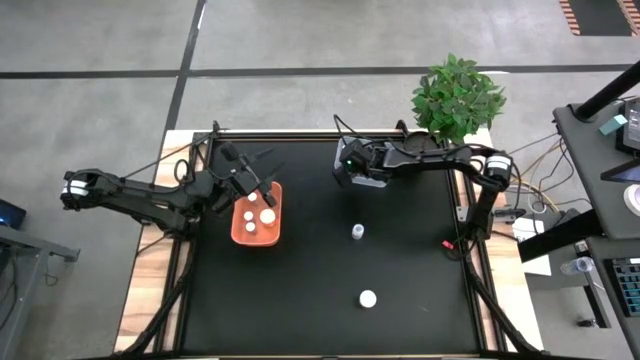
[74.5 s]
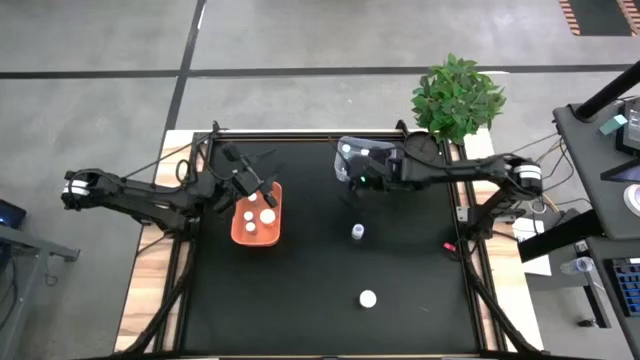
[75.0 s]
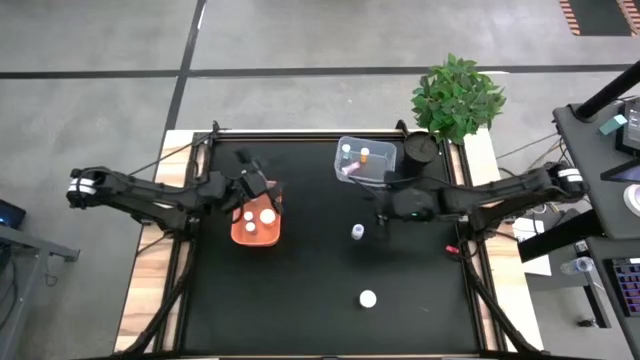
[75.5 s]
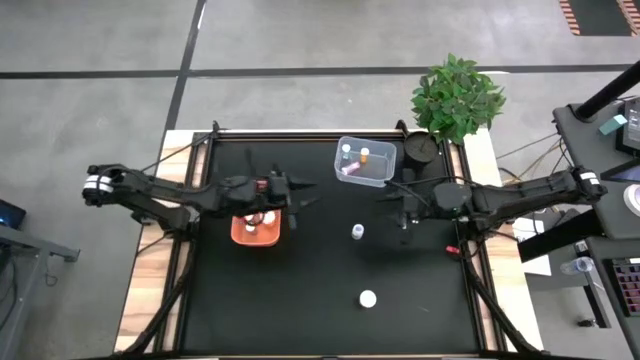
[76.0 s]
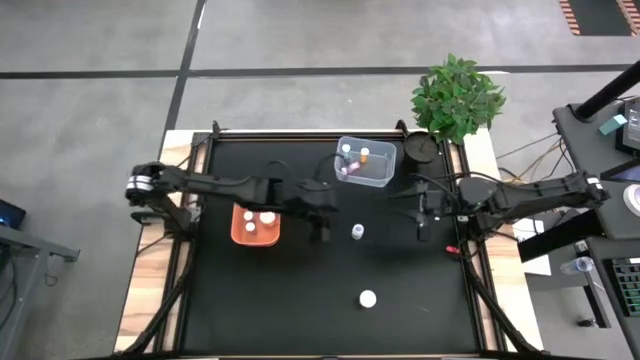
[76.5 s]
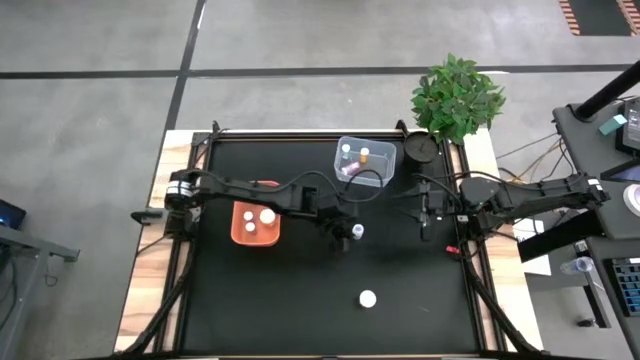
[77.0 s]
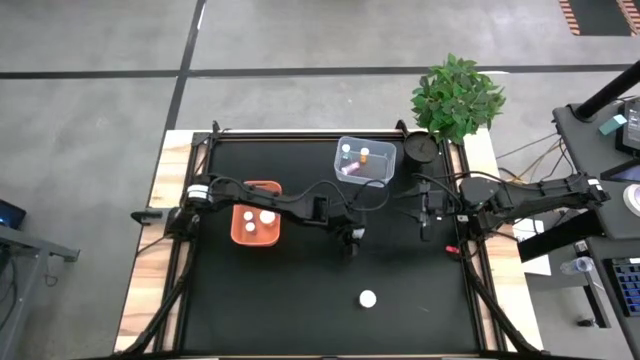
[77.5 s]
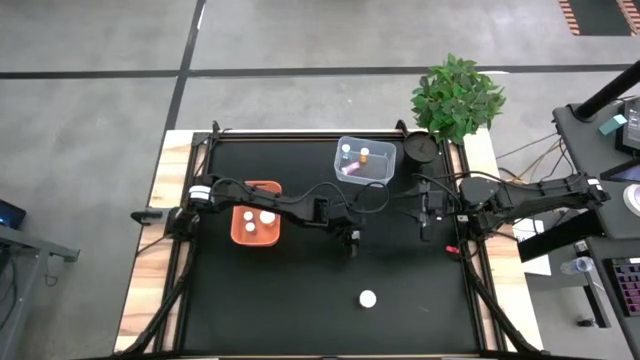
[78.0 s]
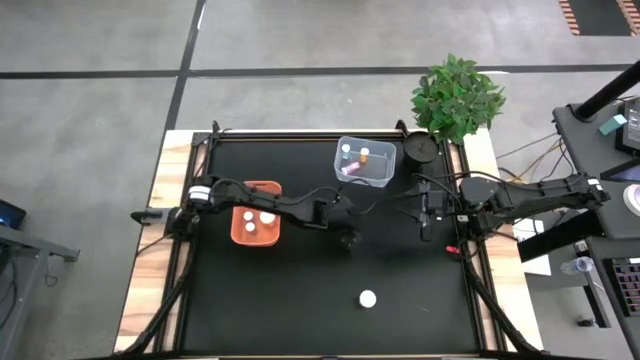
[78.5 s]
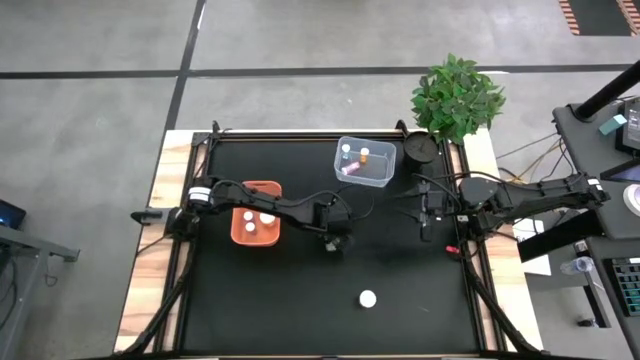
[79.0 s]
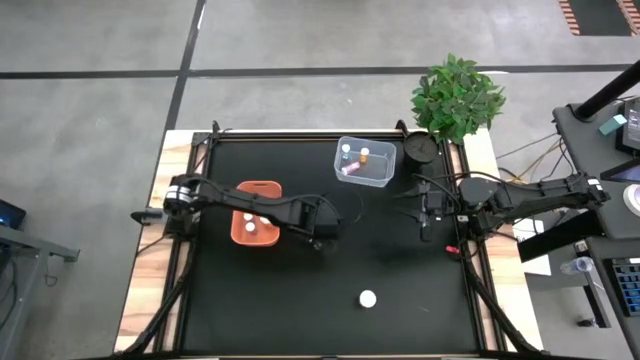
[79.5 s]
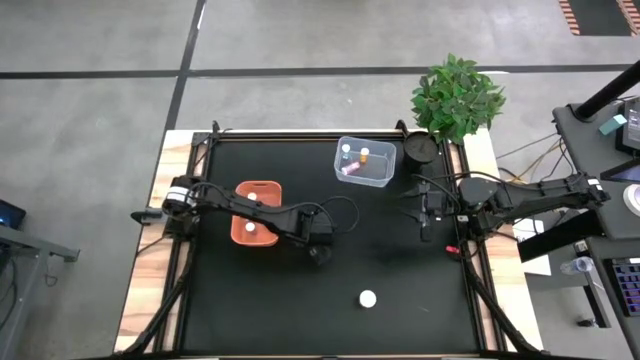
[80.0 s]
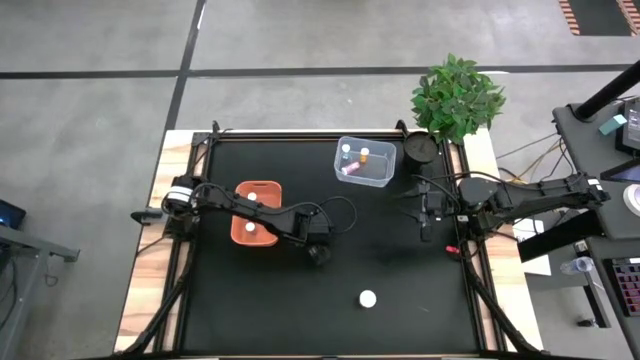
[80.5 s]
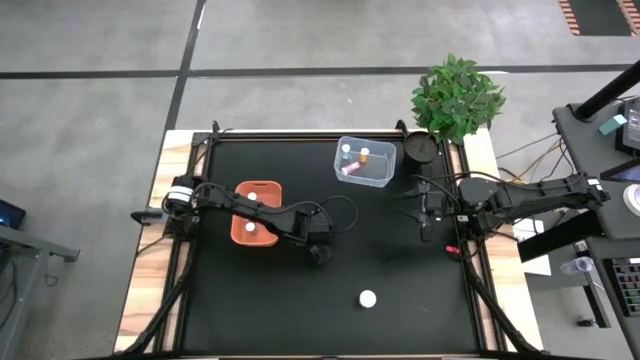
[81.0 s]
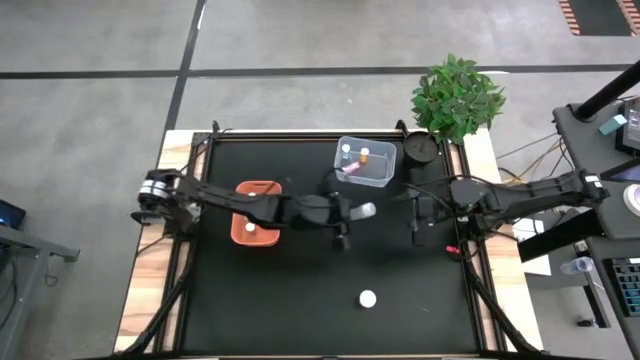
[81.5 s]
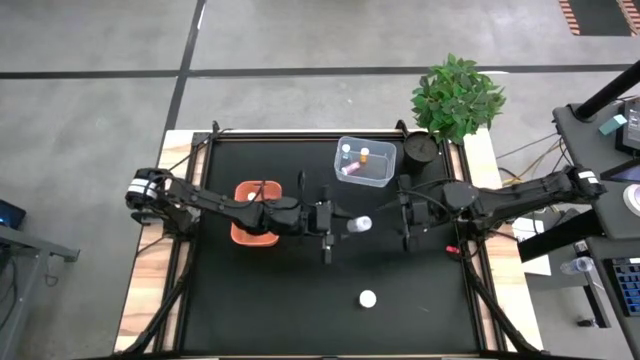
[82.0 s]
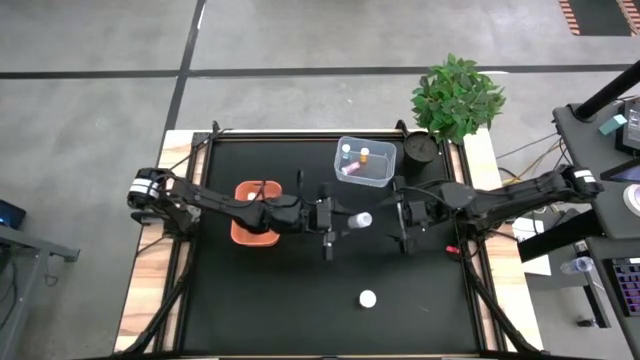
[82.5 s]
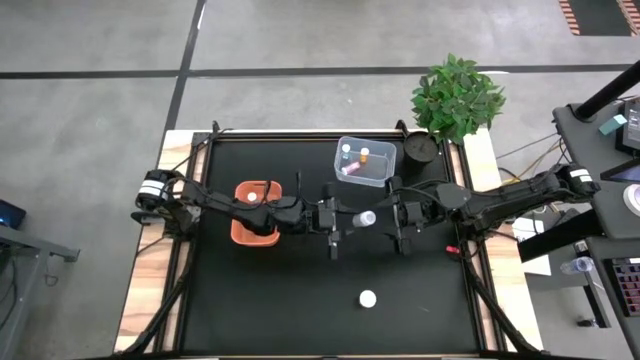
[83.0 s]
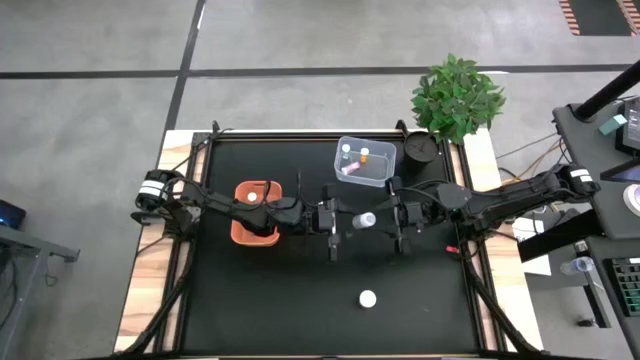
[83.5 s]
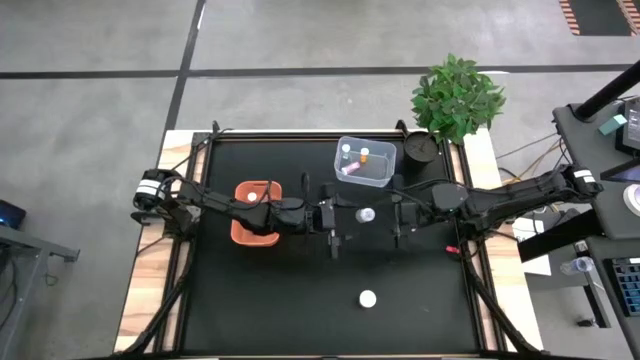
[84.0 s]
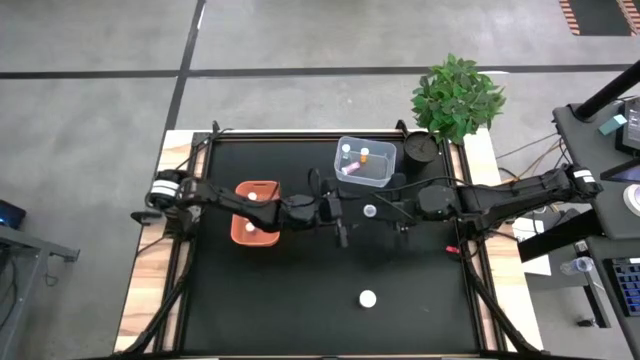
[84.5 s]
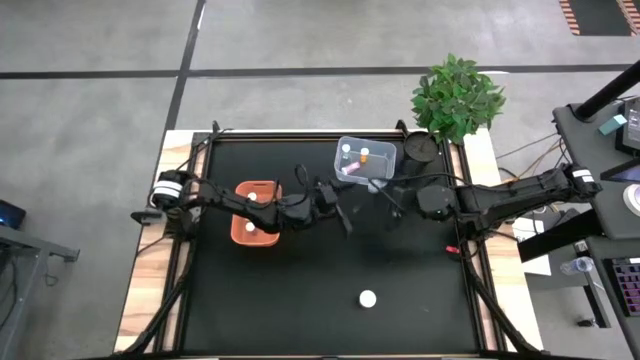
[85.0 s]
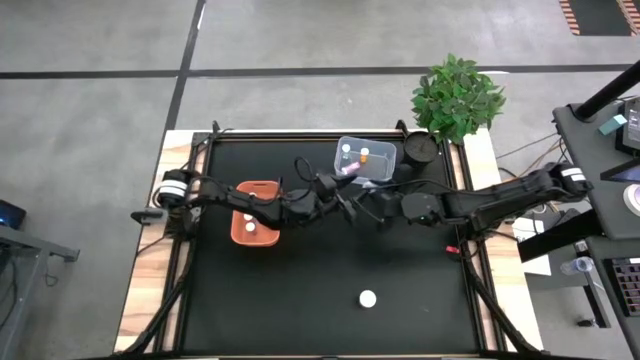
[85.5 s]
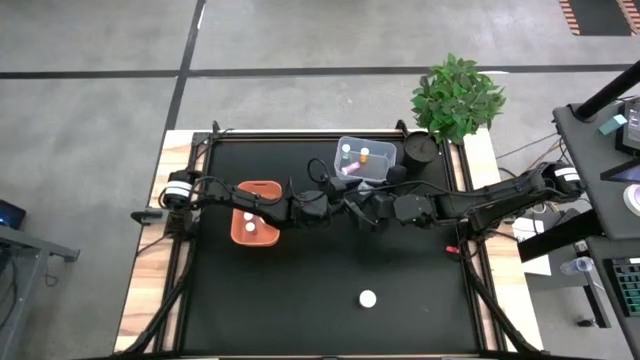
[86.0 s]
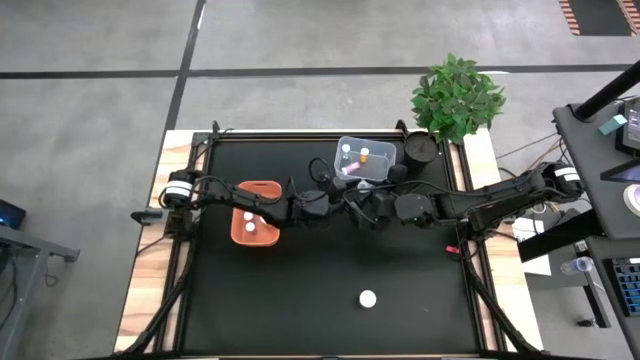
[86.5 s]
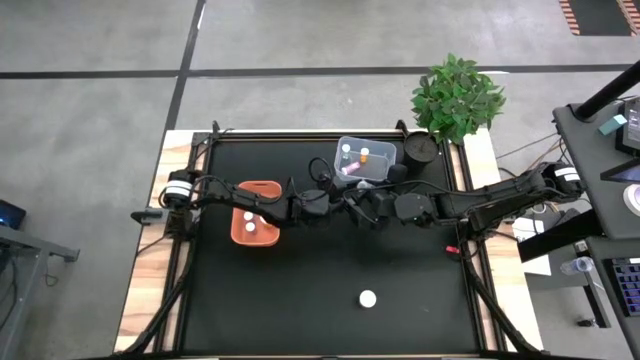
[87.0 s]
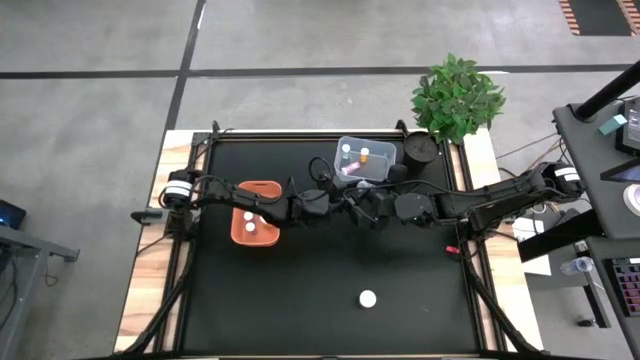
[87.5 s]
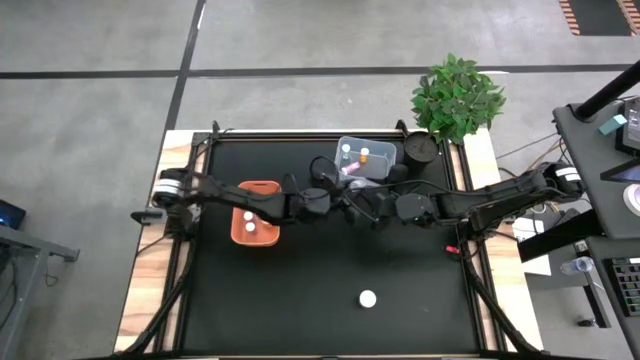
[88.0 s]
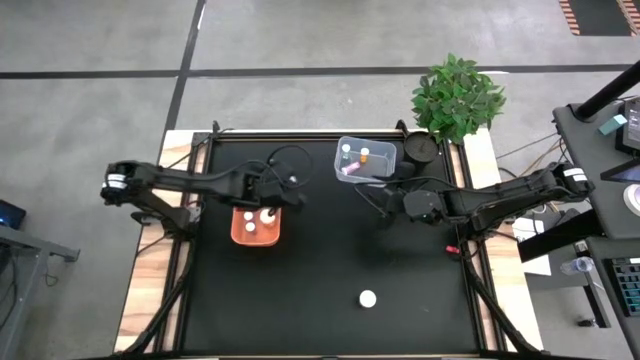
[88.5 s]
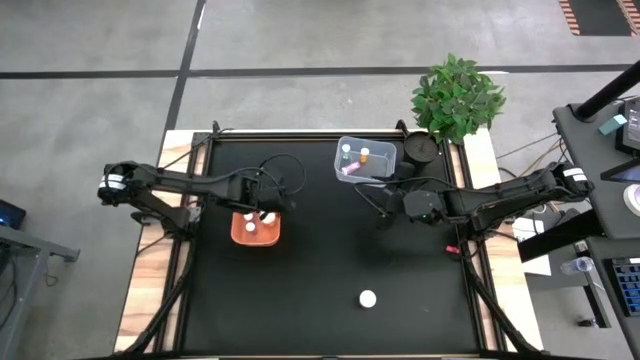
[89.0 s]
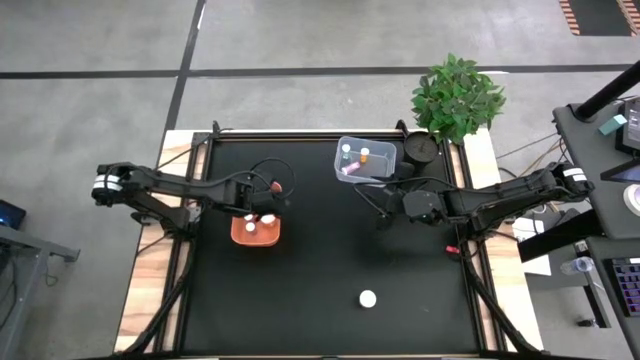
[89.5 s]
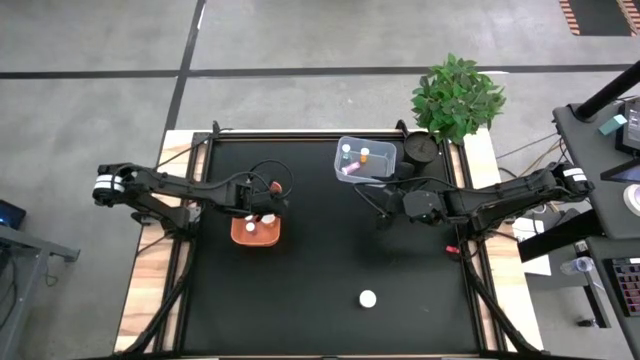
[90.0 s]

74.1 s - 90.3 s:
Task: Pick and place medicine bottles into bin by pill shape (circle, oval)
Put the transparent capsule pill bottle into the orange bin

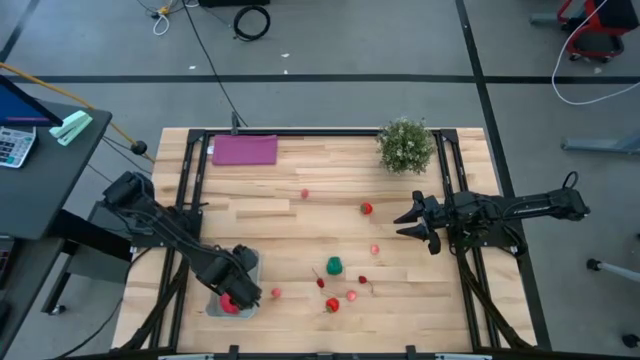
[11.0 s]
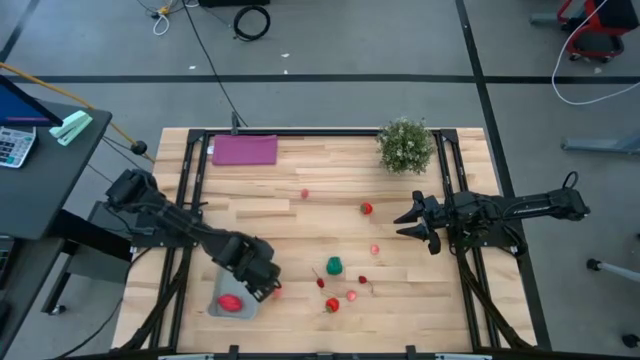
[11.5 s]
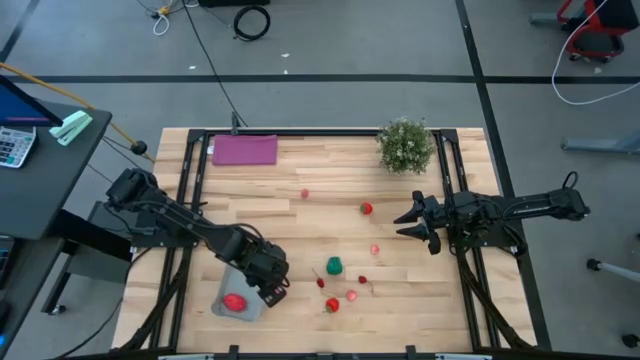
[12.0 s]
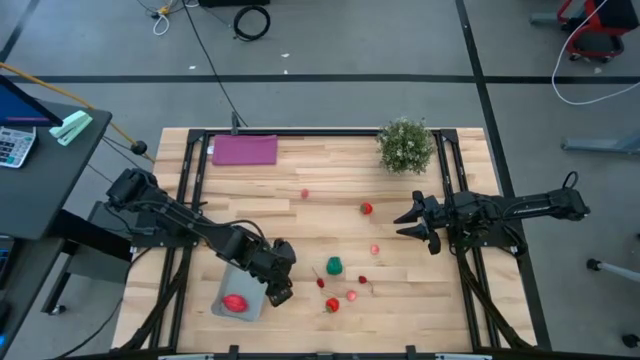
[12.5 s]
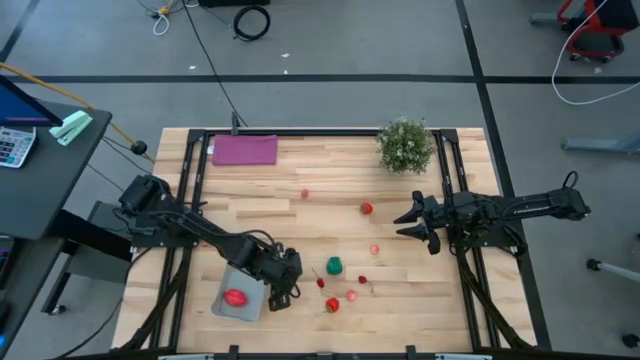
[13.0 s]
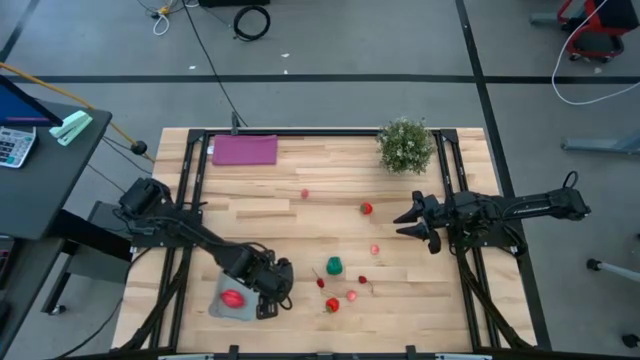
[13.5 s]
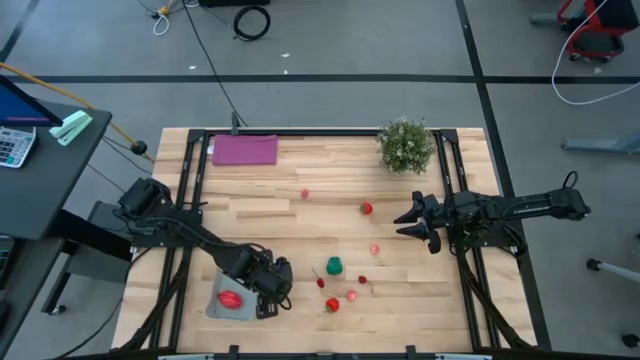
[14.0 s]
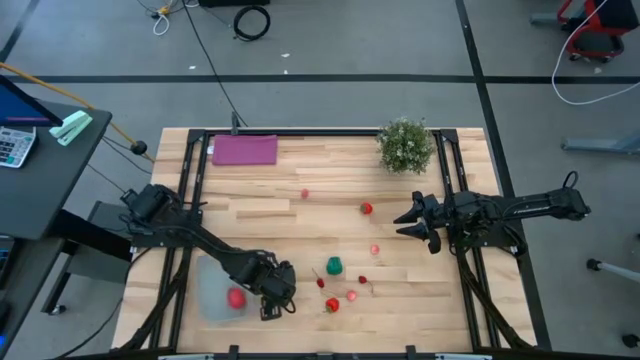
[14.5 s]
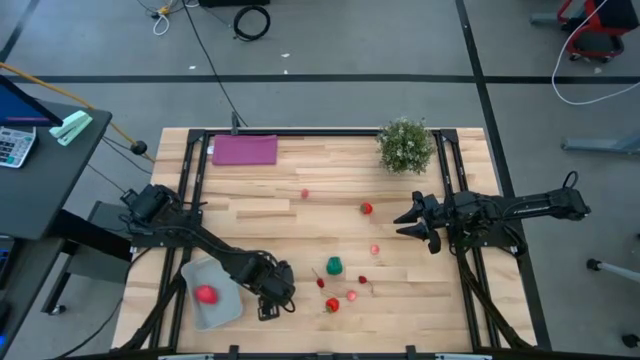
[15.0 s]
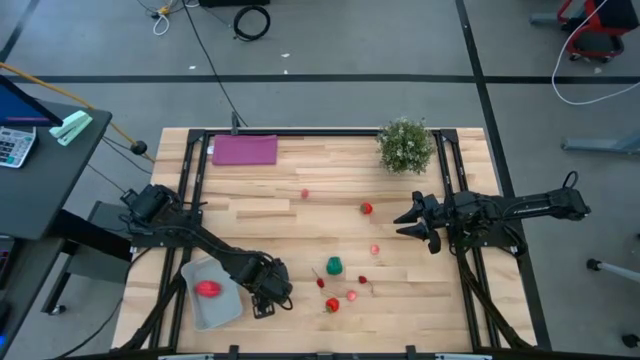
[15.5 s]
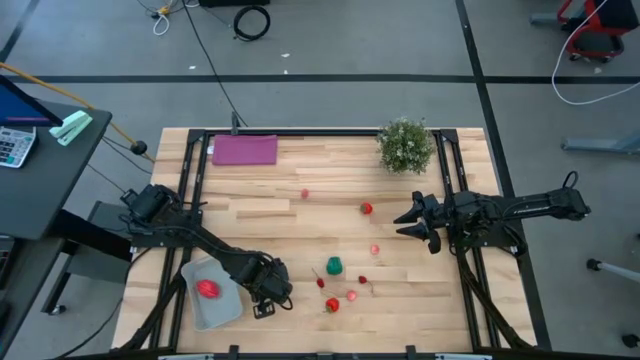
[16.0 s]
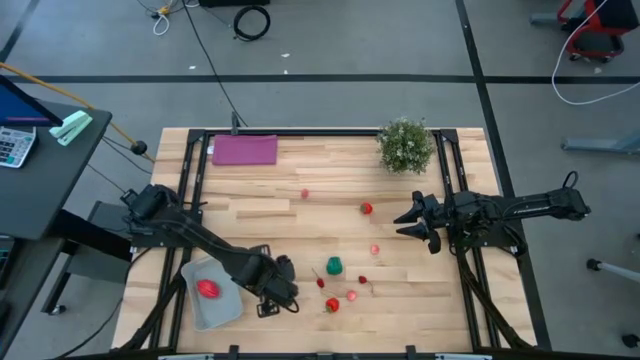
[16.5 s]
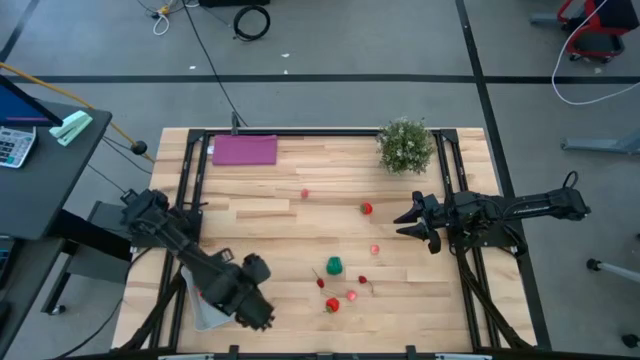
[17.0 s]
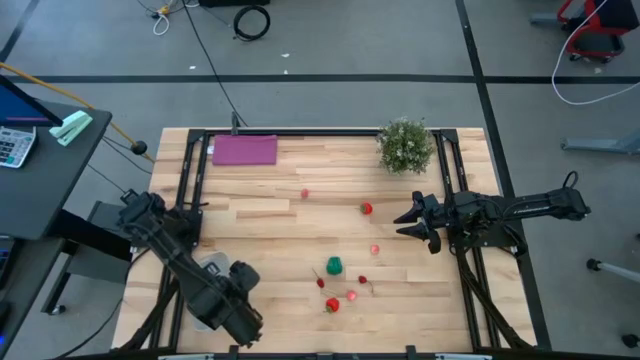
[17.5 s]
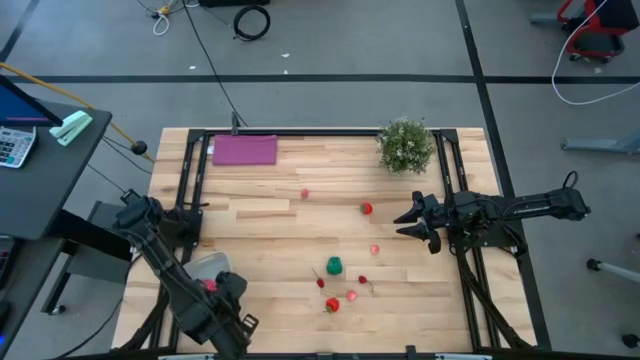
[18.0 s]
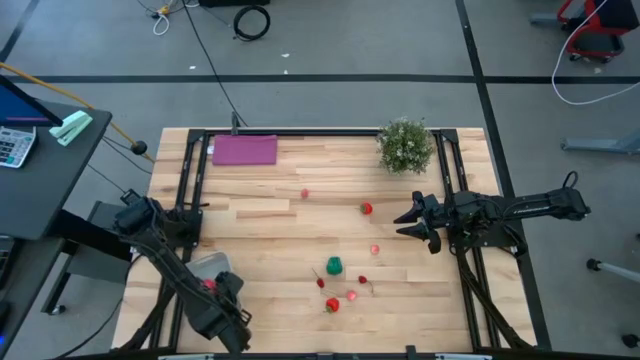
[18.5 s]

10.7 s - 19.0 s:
Task: Pick and placing Produce into tupperware
Put the pink peach into the gray bin
